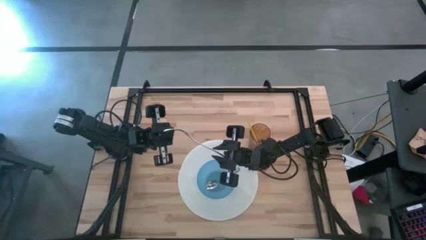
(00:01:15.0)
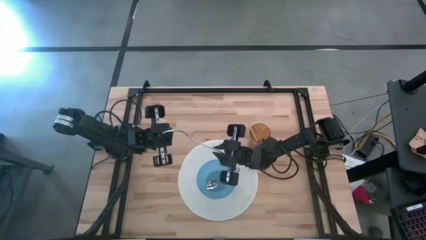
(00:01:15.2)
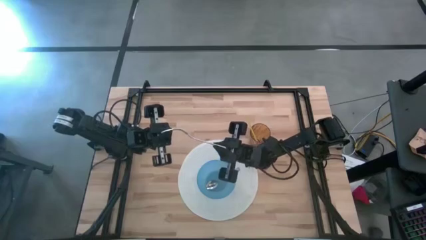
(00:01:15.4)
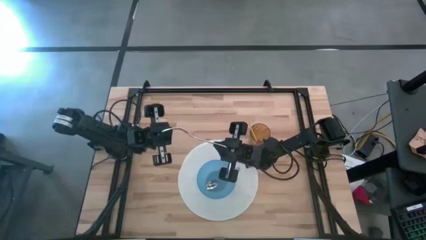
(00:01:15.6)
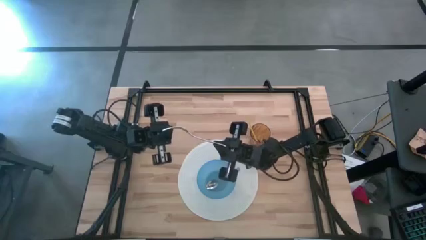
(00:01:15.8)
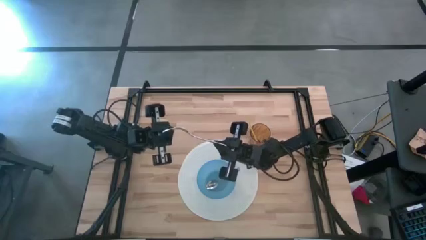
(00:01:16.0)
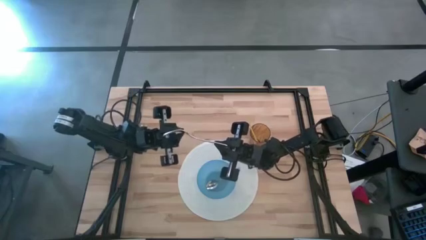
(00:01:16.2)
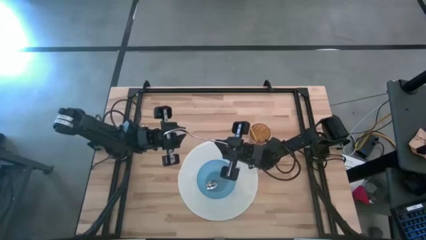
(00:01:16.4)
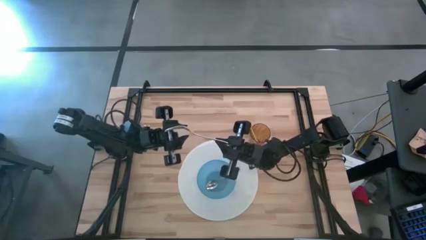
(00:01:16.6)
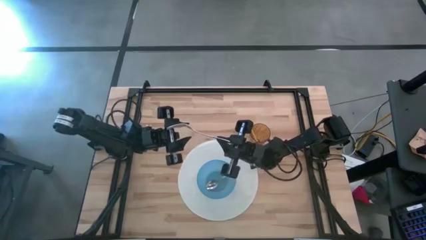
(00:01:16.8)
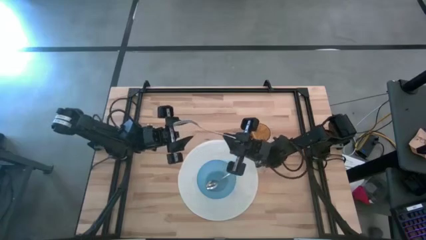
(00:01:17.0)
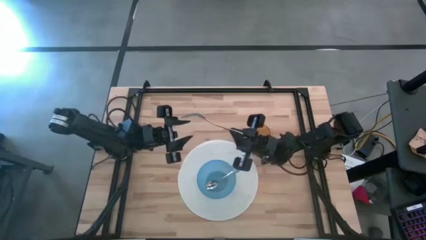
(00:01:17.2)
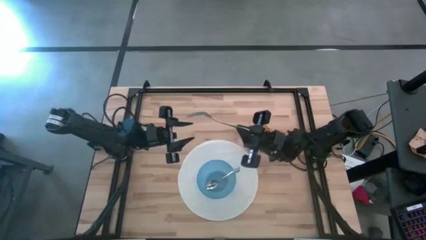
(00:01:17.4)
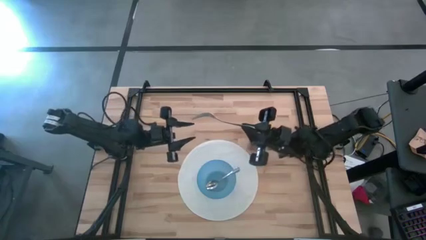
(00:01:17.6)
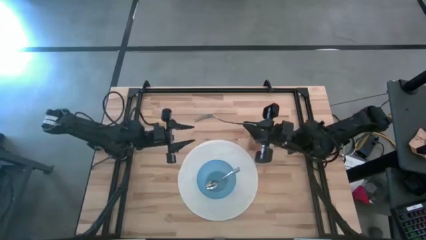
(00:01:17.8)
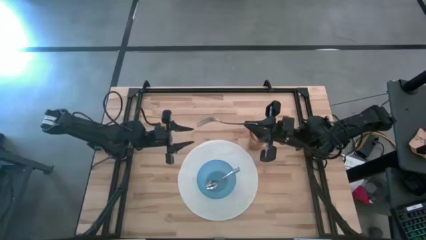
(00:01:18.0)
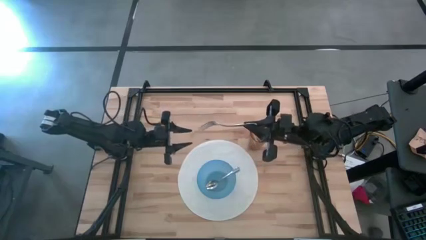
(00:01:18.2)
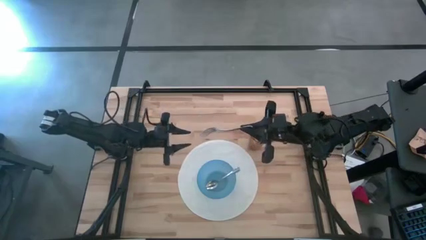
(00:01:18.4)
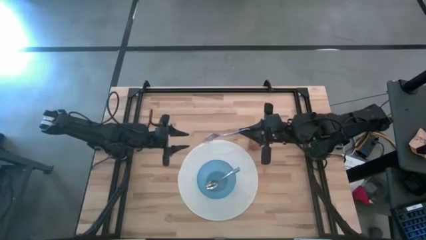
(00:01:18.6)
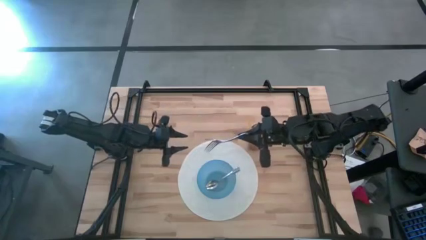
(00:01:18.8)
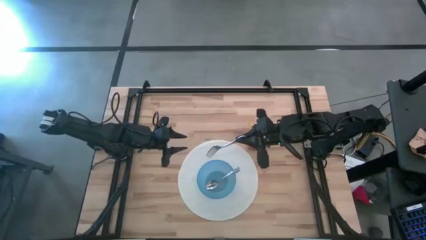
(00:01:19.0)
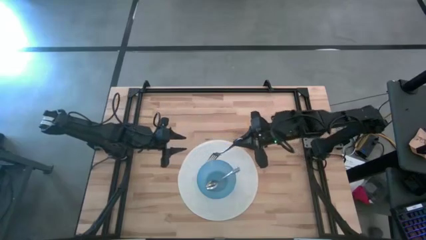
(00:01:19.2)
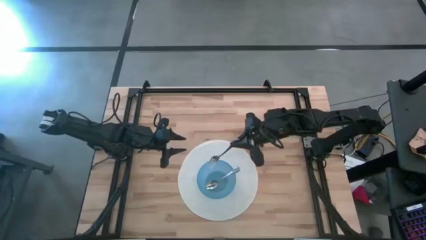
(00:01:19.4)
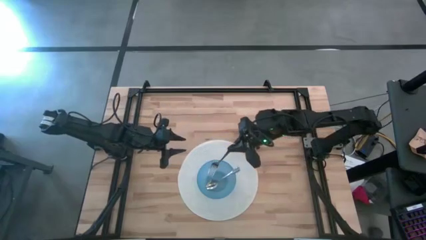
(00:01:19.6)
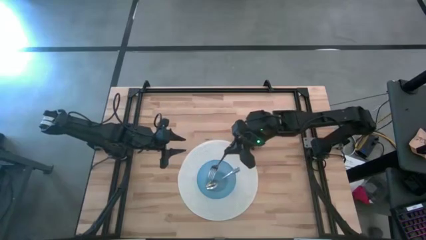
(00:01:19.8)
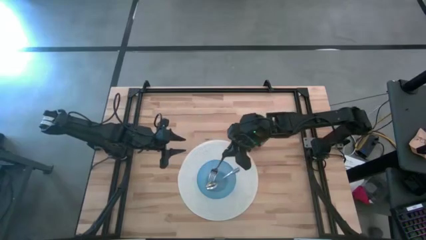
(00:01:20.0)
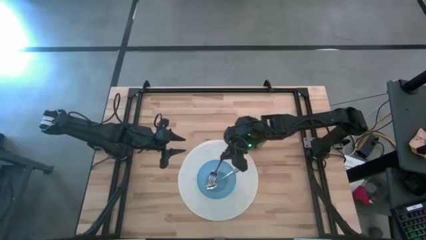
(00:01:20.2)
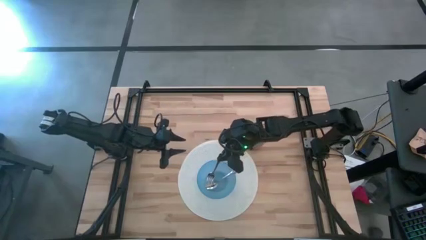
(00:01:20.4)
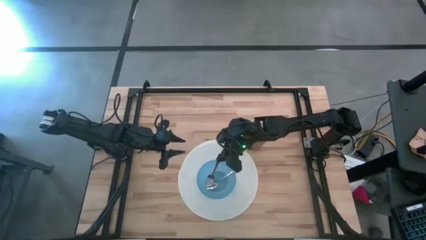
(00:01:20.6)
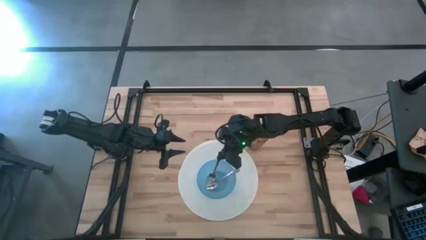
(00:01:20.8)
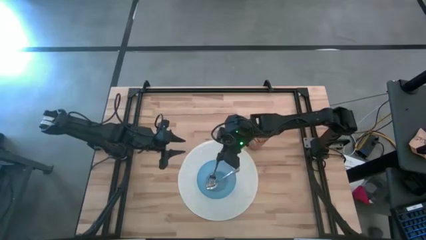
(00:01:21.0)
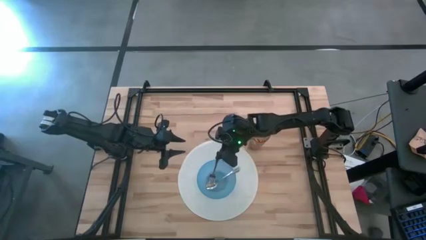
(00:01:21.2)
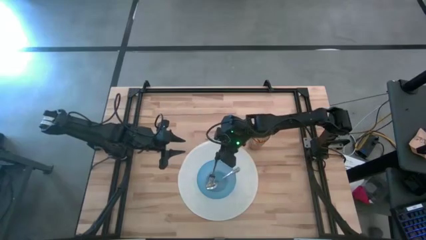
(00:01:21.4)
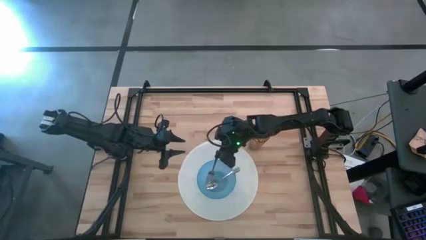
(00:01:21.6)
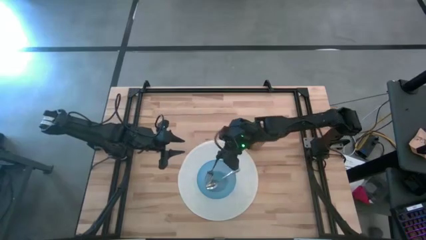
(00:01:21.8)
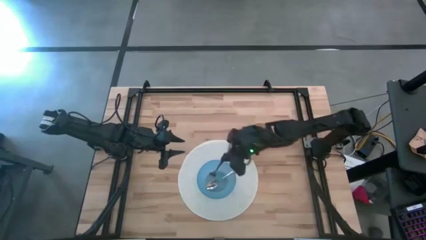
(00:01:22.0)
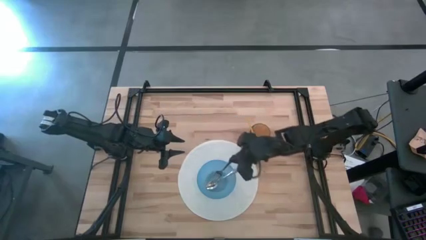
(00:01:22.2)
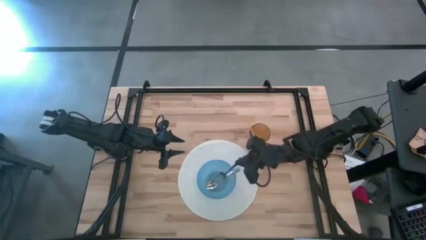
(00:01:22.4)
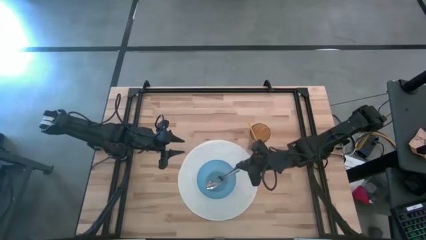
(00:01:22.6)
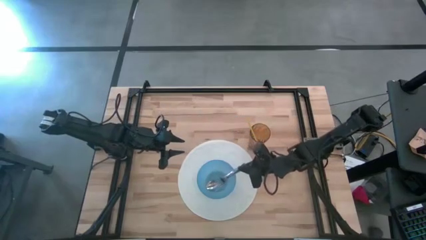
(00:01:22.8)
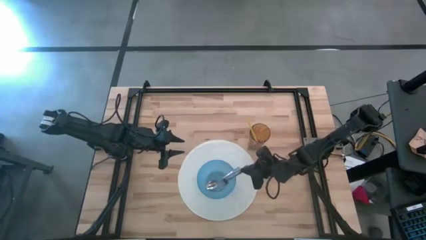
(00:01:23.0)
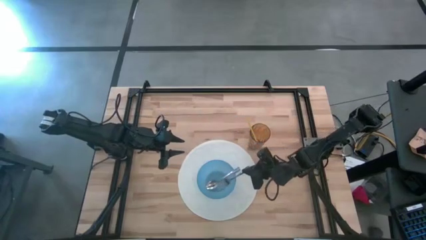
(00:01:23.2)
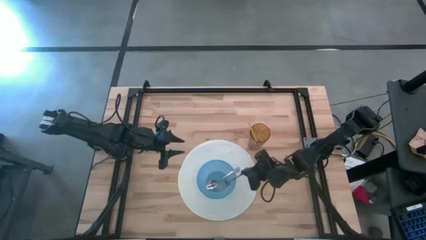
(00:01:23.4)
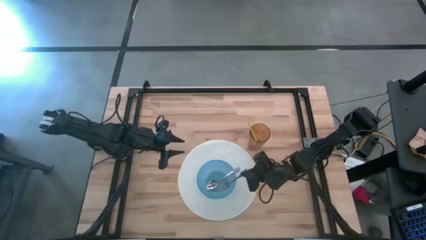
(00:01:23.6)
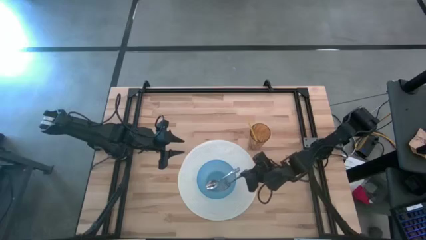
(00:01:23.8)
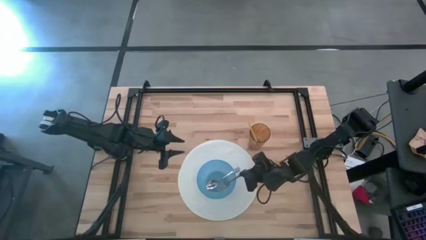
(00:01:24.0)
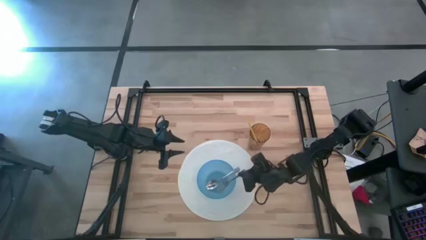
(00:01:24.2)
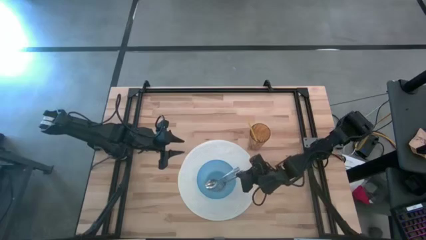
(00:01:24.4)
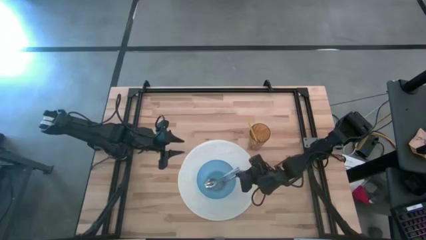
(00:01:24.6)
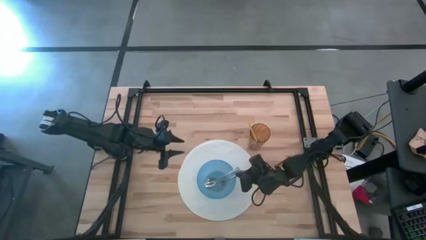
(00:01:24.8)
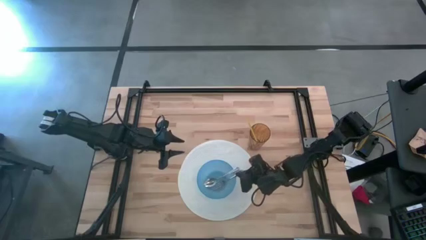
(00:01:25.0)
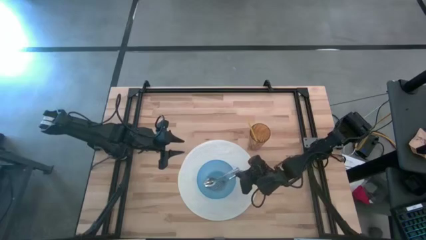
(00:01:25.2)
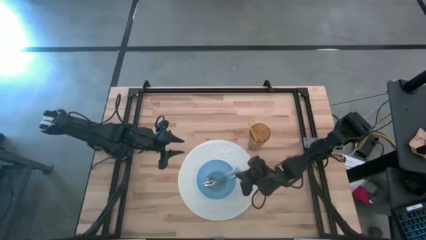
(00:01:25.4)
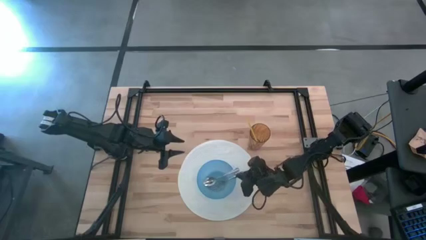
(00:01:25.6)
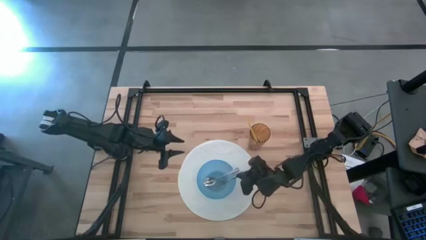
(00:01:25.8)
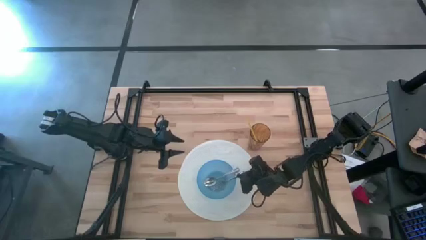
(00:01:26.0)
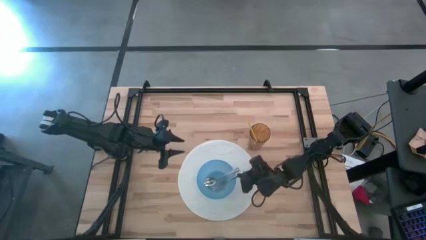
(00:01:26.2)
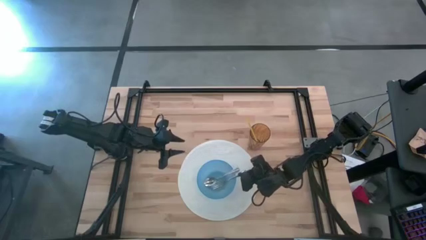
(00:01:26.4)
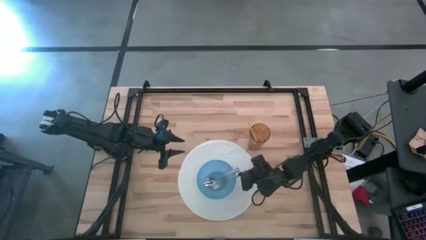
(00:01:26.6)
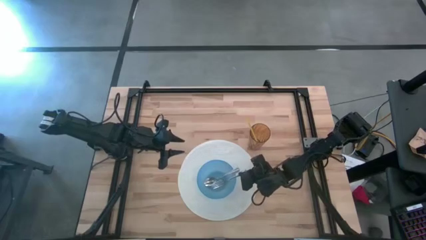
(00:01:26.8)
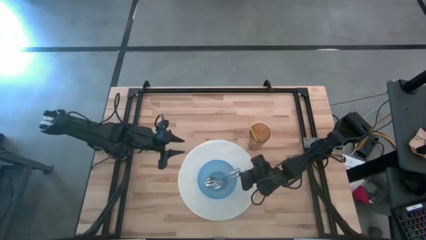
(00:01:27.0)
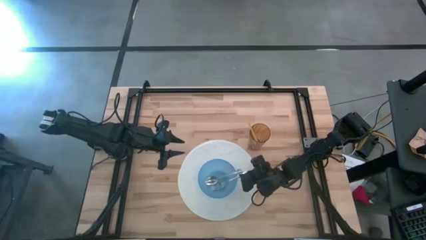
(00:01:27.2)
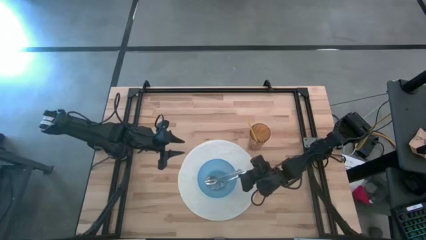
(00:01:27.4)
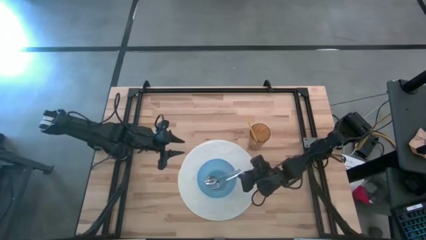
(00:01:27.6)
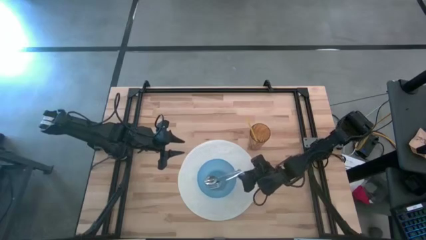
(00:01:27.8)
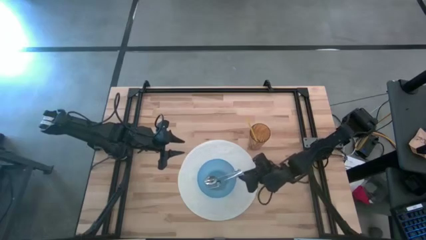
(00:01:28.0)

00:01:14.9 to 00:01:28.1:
Task: Pick & Place Utensil
Put the silver fork into the blue bowl on the white mat

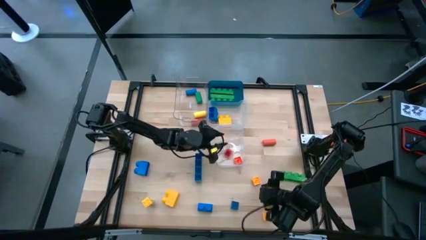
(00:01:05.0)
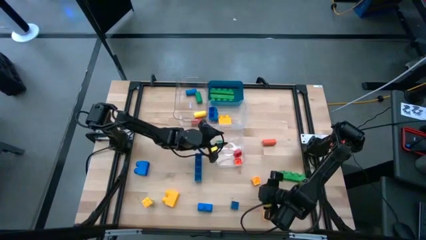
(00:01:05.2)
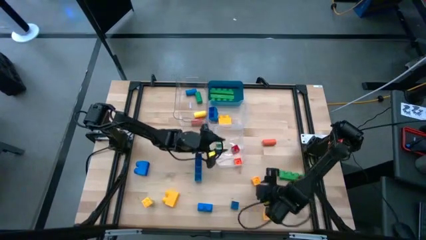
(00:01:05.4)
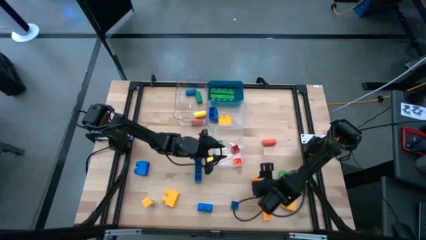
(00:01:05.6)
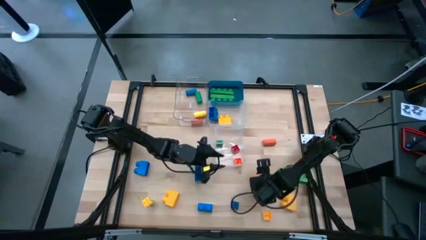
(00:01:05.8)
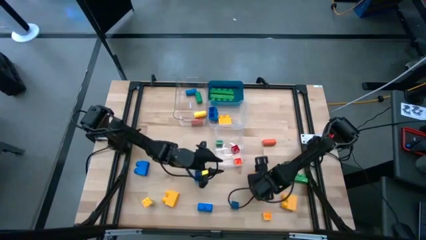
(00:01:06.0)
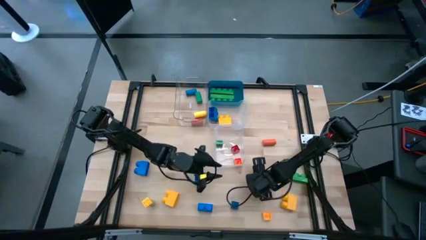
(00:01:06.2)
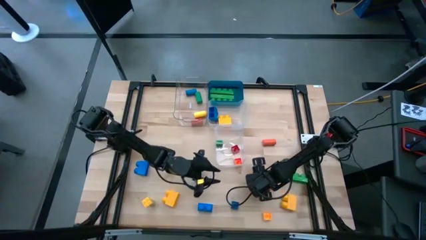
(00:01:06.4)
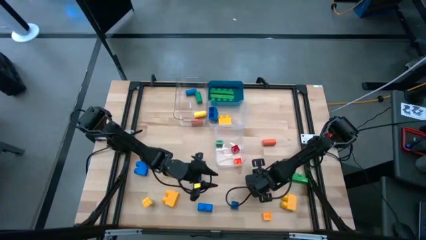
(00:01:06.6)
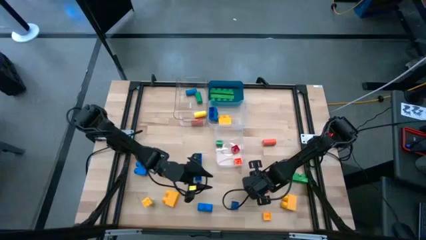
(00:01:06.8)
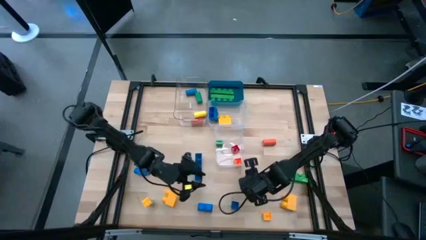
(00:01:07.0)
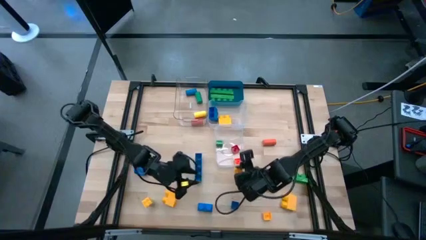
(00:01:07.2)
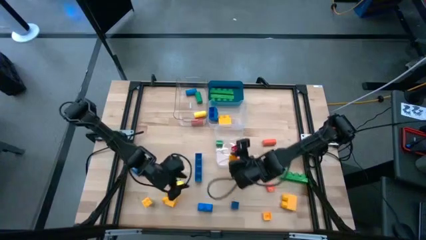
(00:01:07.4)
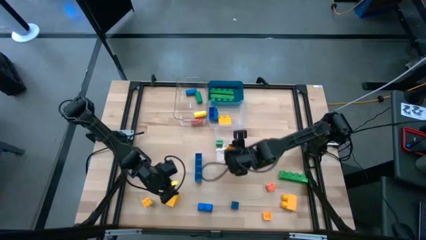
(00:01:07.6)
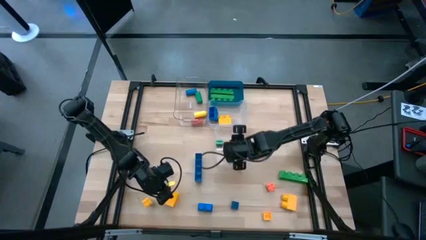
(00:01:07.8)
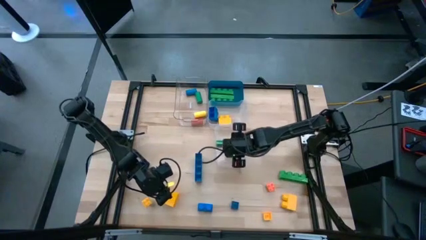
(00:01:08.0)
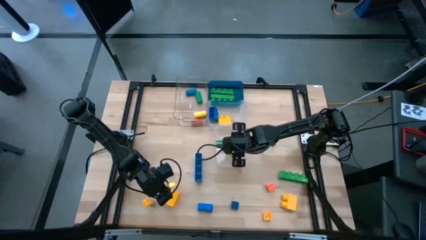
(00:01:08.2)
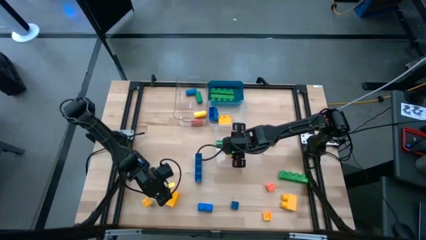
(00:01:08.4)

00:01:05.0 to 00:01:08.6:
Task: Sort blocks by size
Put the yellow 4 stud small game piece into the bottom transparent bin
